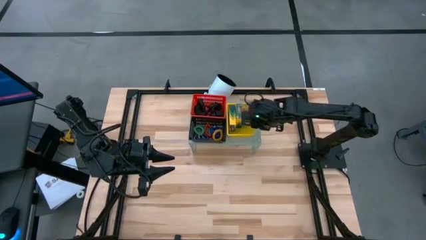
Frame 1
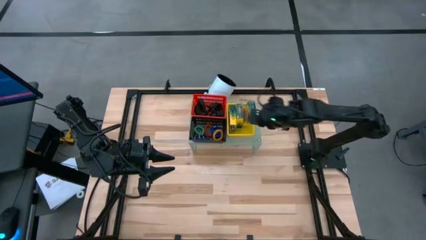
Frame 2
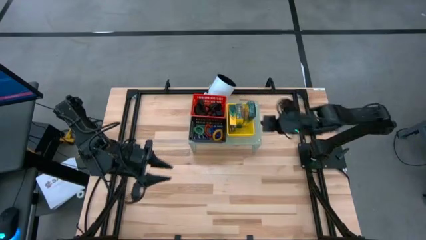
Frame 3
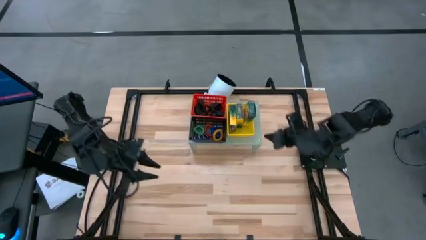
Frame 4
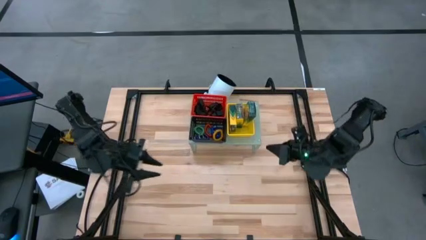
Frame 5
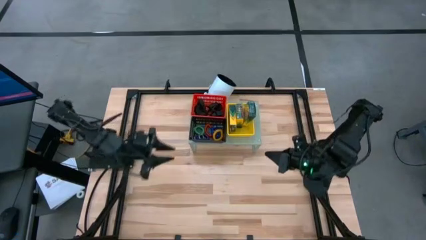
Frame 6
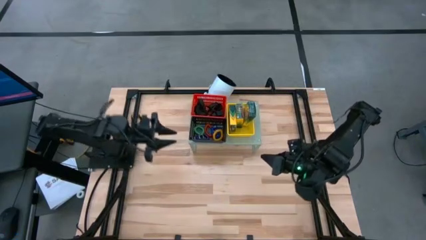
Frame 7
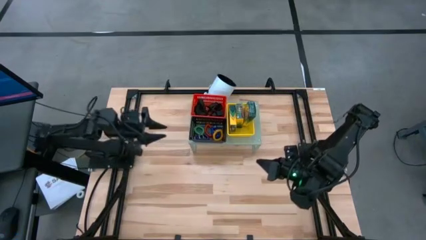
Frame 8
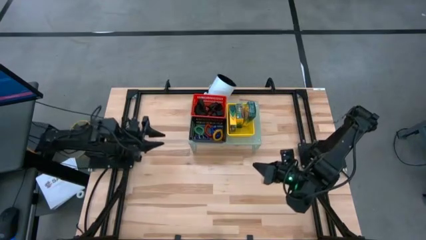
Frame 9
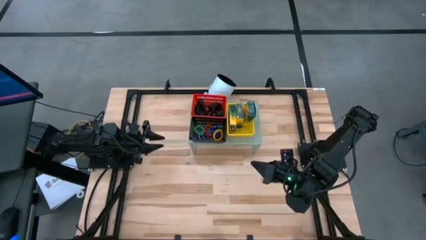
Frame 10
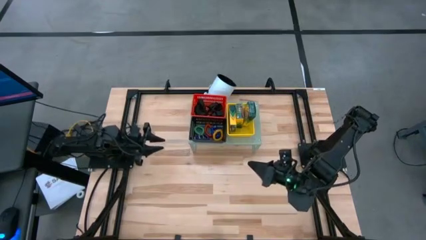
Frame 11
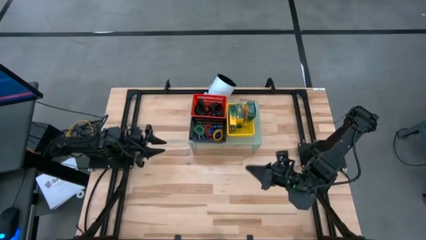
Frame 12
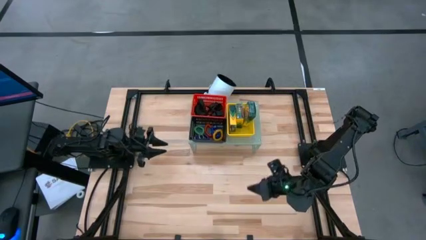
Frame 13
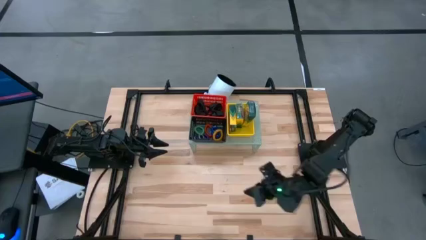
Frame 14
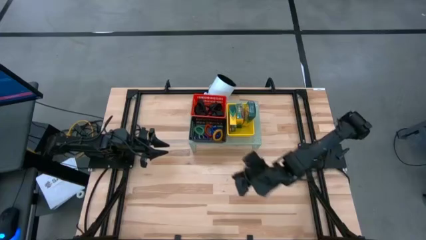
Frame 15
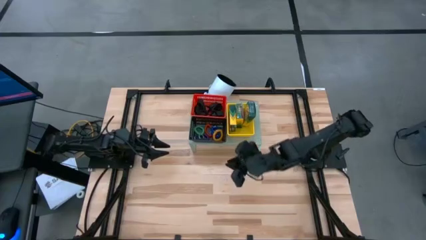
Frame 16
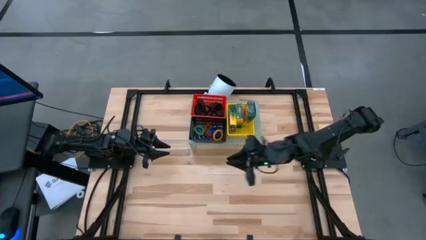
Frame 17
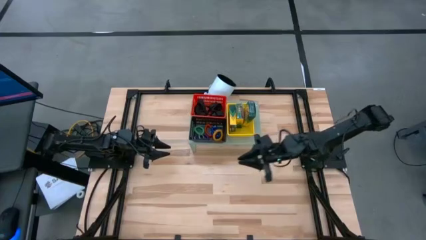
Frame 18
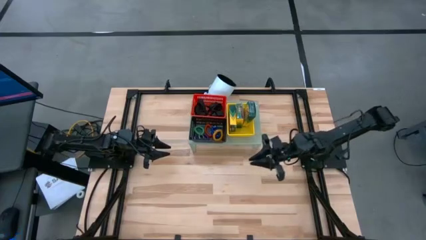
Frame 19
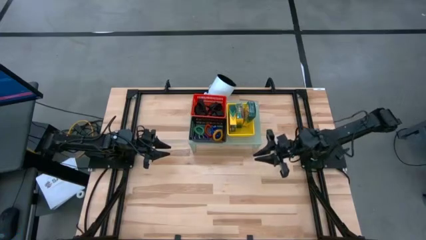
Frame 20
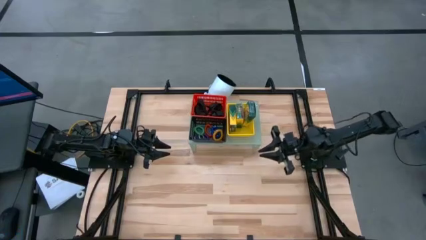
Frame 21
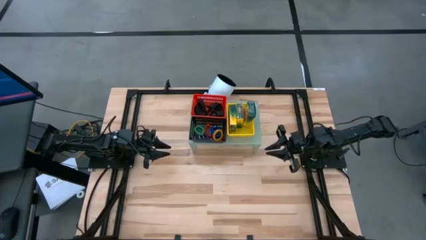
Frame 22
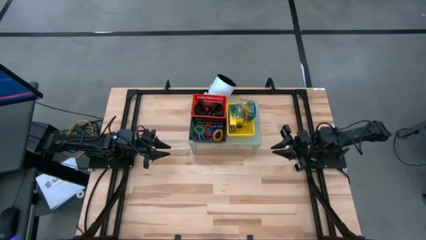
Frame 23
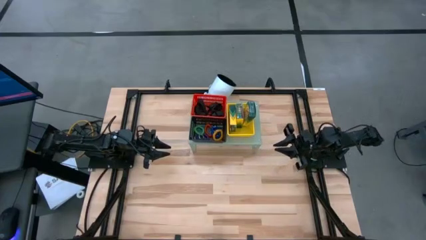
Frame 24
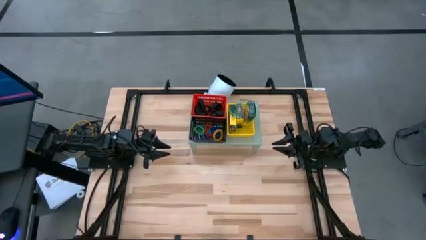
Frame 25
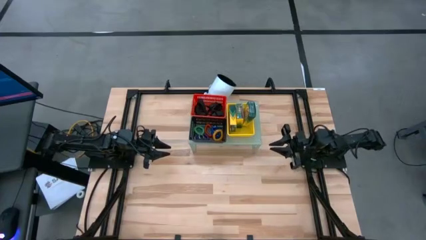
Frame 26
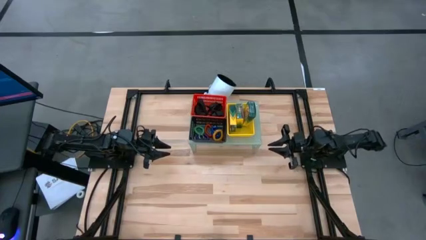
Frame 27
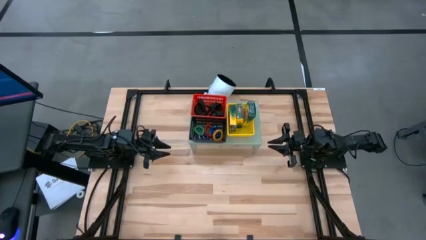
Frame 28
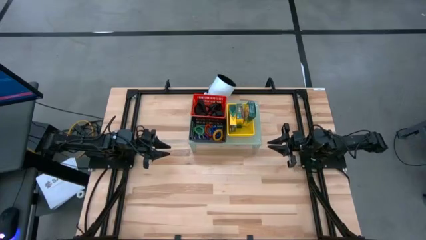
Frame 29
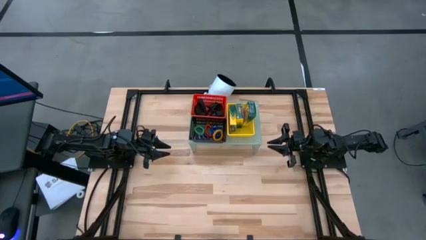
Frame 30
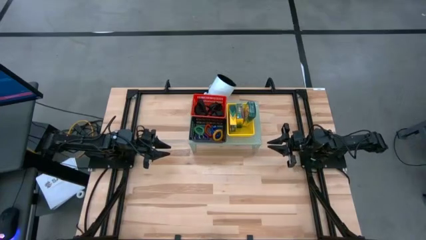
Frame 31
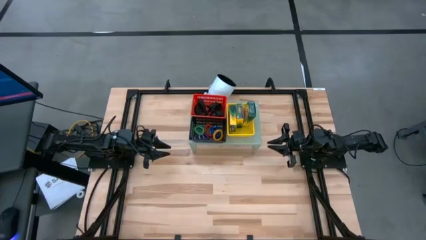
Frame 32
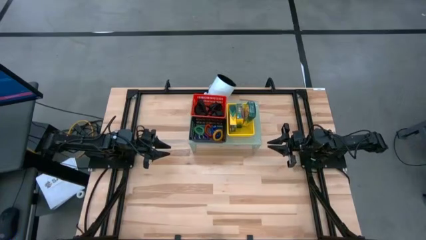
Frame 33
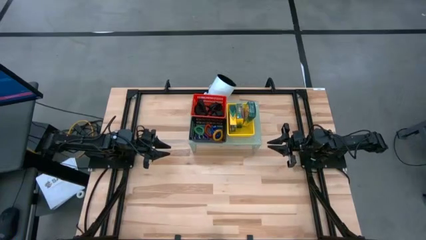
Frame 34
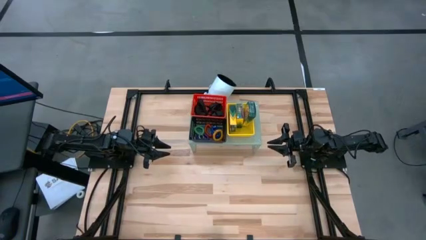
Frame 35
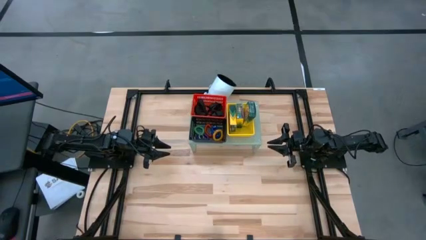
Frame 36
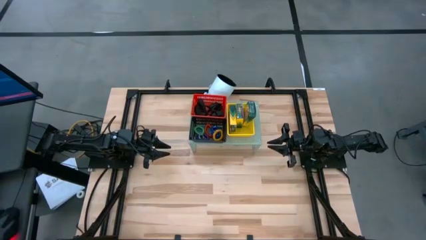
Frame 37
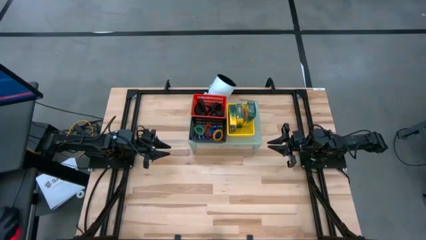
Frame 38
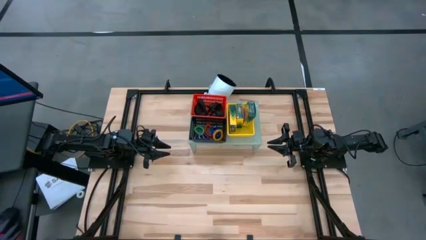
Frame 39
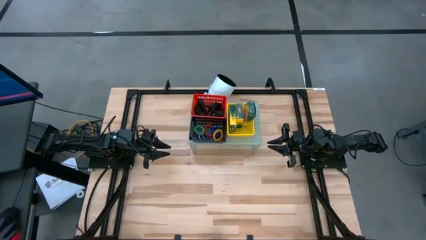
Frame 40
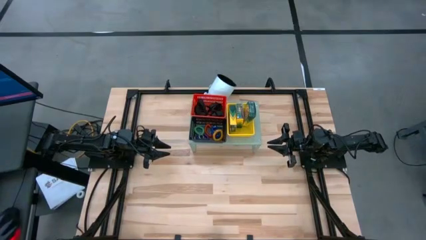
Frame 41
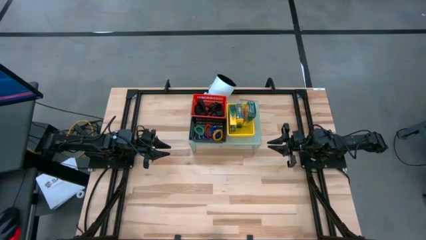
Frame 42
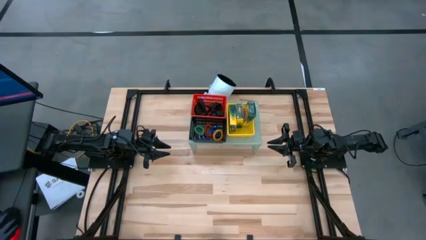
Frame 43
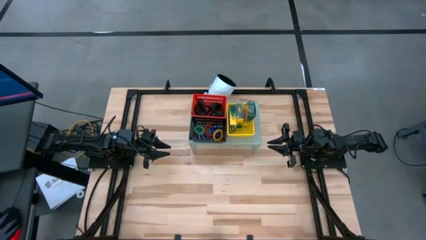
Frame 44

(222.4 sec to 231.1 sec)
Task: Pick & Place Office Desk Supplies
Return to Home Position

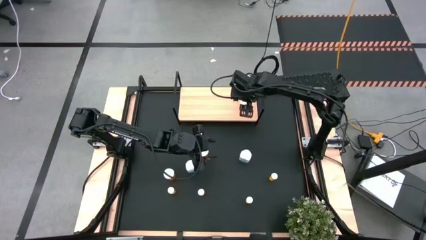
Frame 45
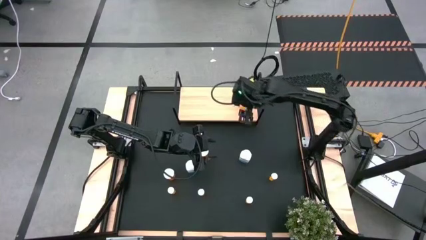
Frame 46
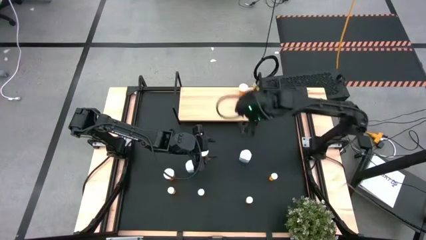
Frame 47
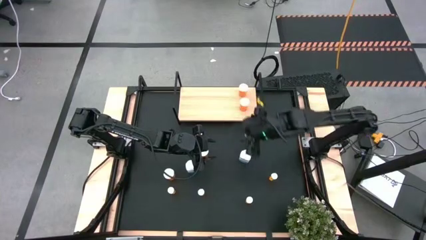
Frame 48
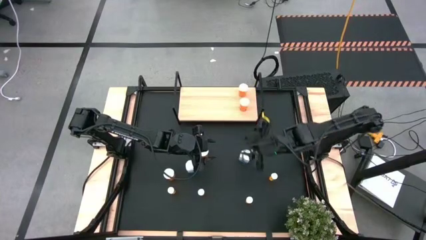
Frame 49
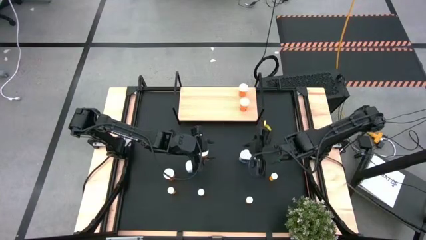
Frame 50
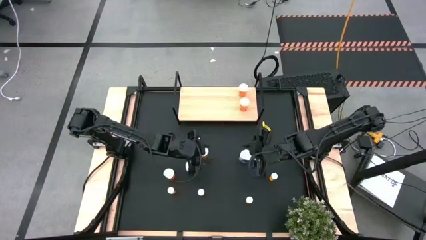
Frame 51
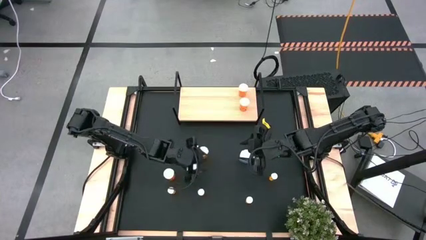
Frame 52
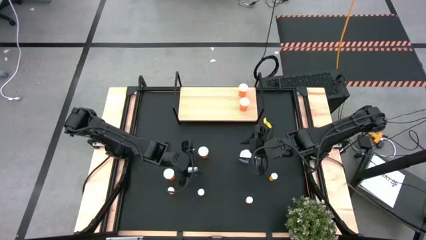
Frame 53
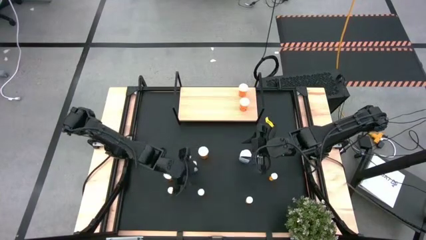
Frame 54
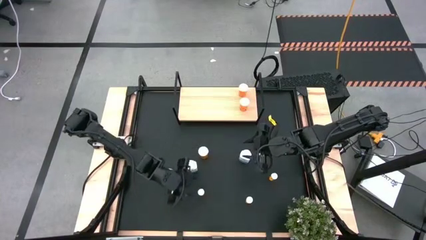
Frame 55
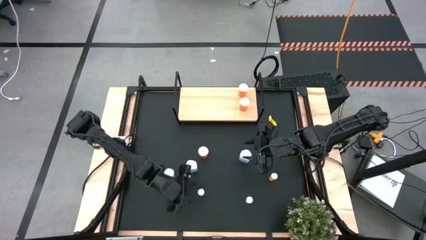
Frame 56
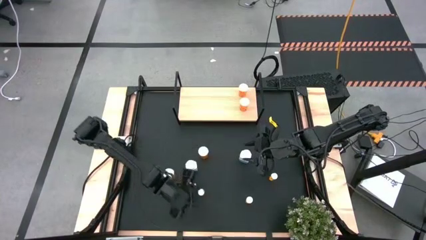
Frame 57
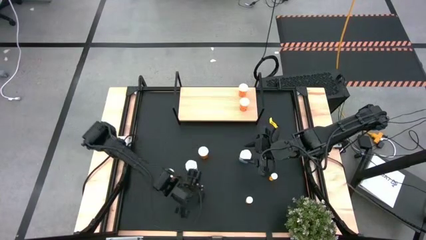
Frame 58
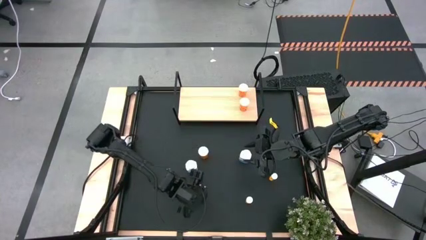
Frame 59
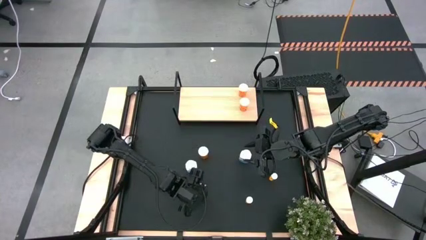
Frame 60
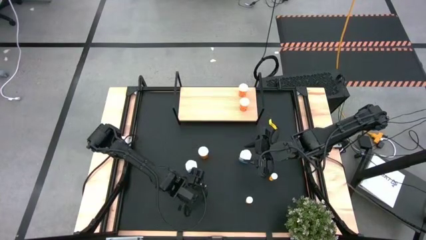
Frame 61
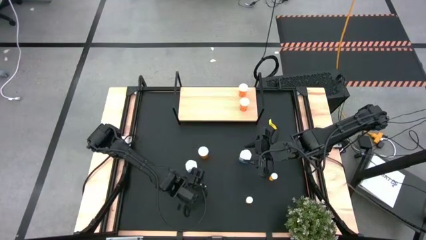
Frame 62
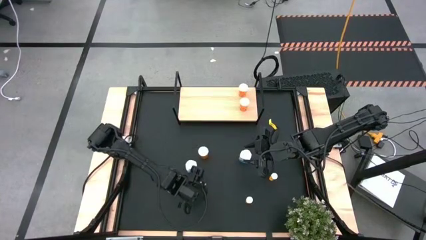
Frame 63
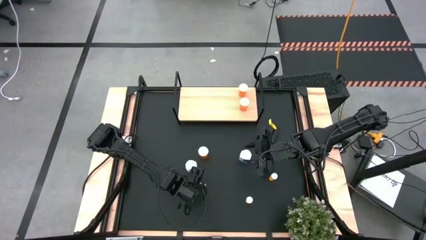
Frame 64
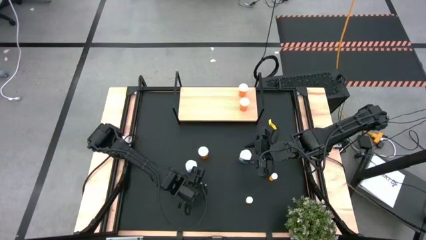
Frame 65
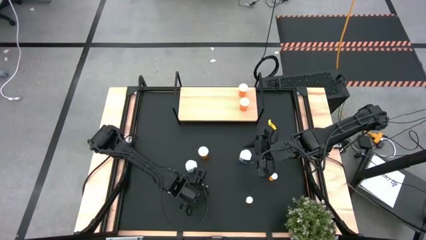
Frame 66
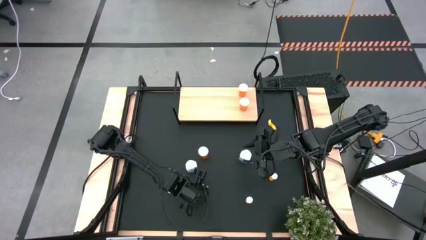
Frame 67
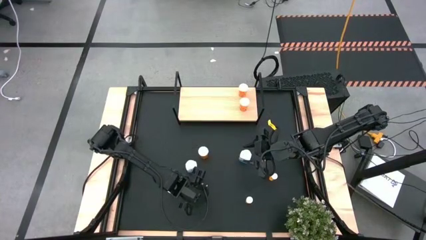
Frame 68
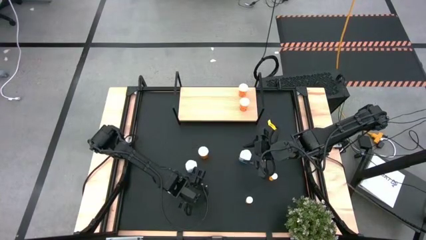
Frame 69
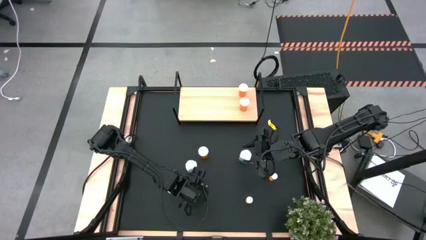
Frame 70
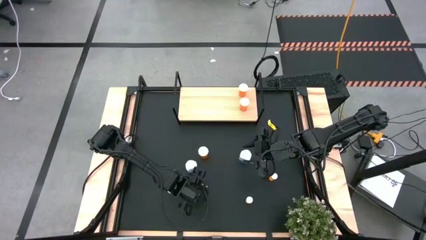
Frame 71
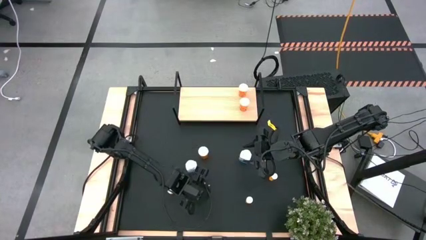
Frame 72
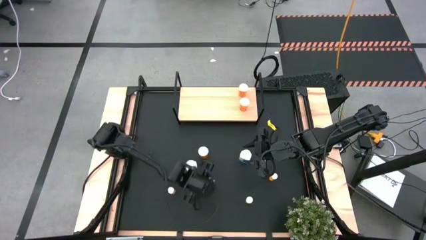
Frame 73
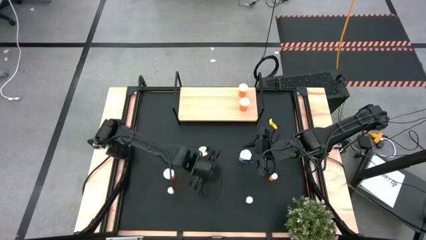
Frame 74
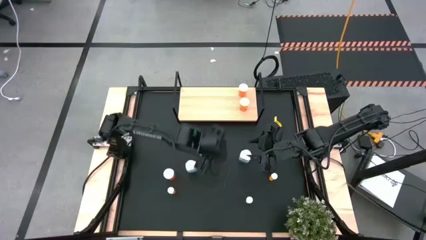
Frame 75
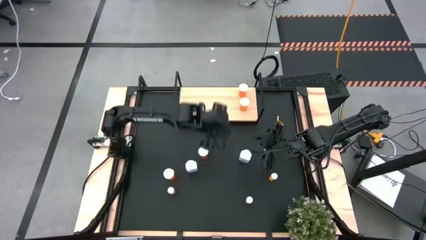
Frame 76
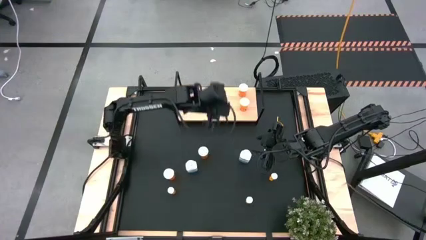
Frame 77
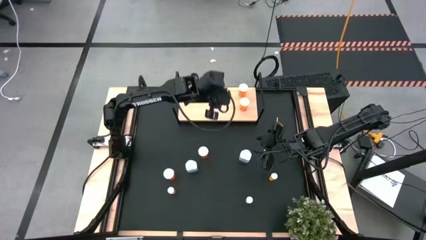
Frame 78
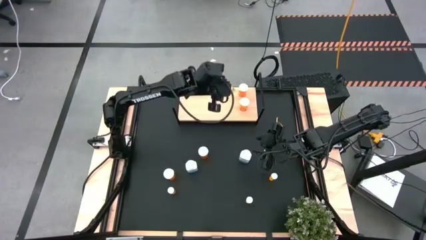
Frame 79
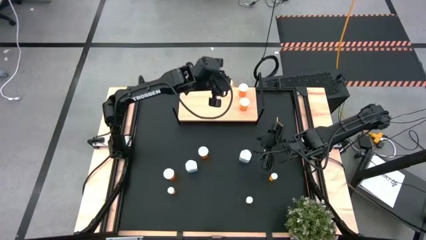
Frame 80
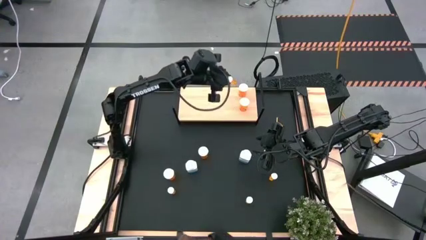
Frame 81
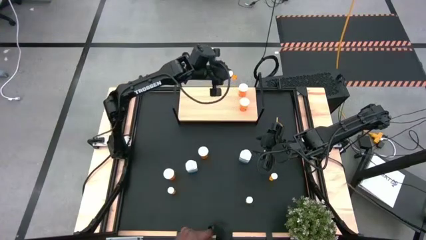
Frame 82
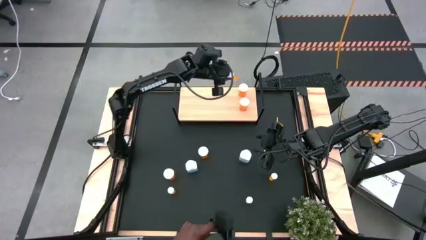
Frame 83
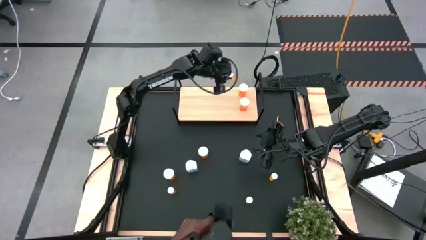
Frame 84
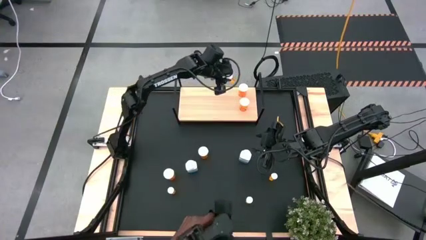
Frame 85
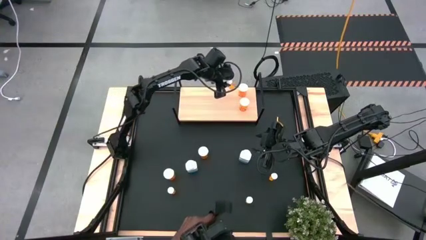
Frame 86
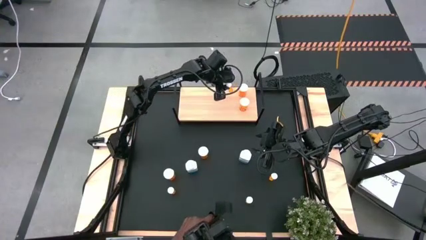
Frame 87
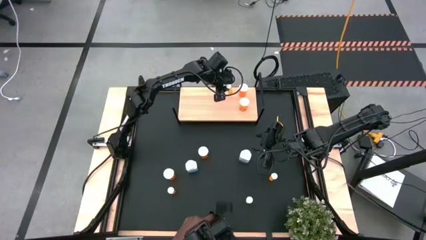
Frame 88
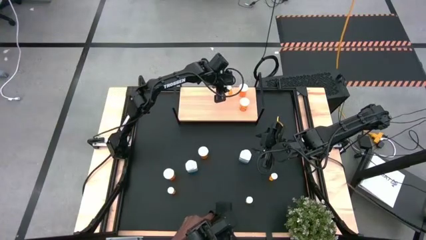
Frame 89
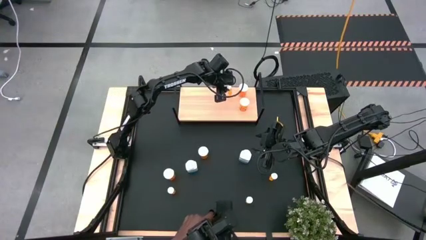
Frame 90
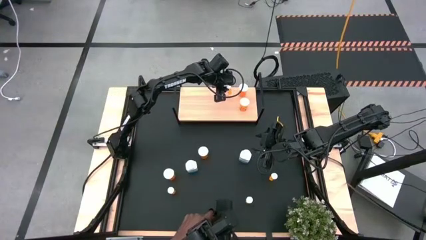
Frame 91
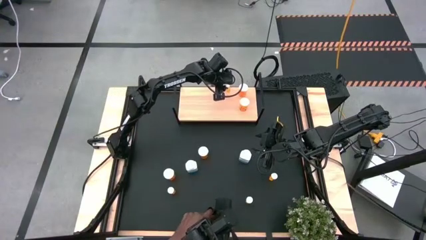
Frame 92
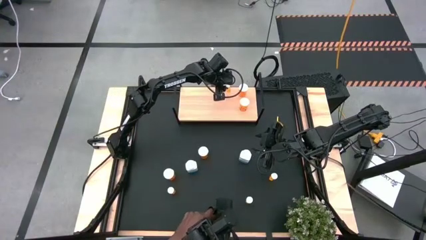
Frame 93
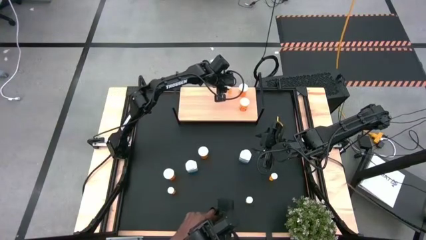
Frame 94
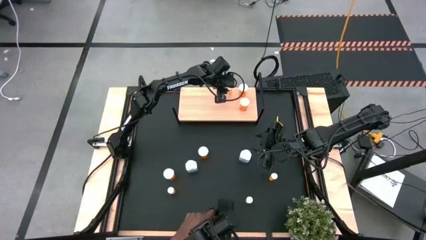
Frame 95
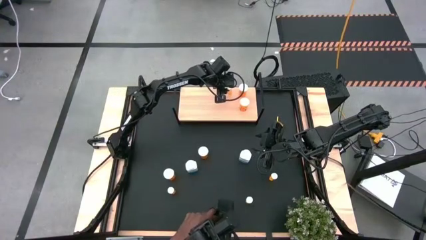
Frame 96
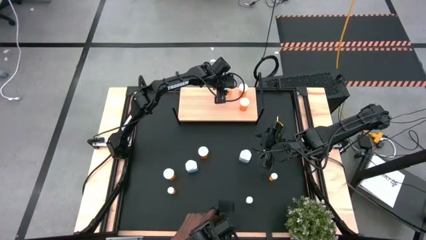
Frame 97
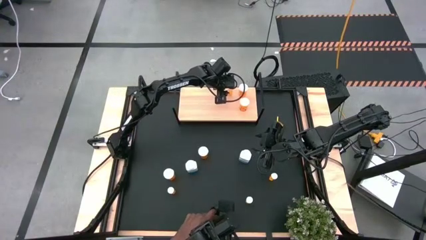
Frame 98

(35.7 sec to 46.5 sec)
Task: Pick and place medicine bottles onto shelf by color
Put the middle small orange pill bottle on the shelf
